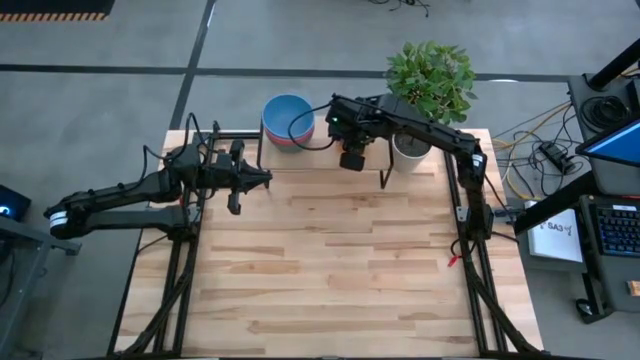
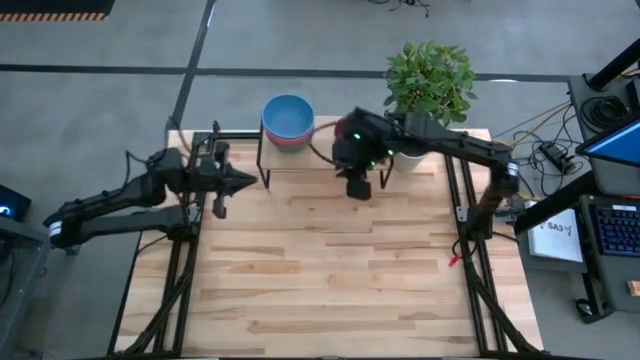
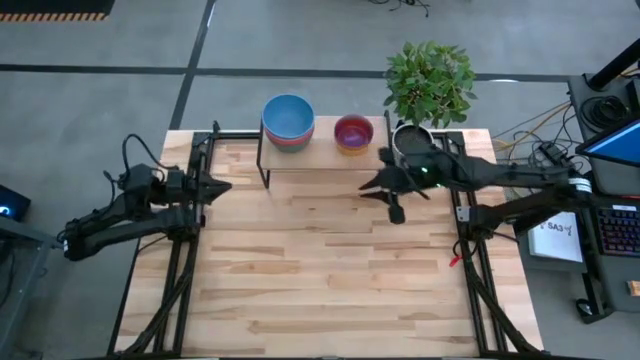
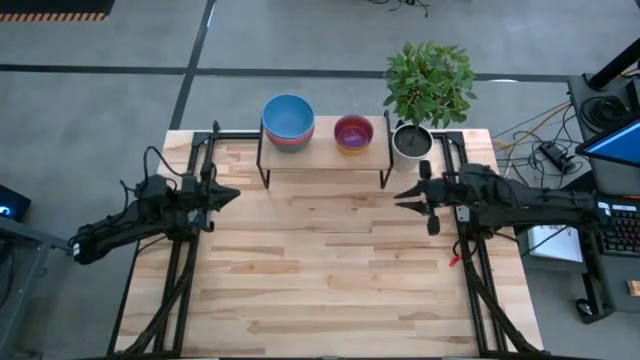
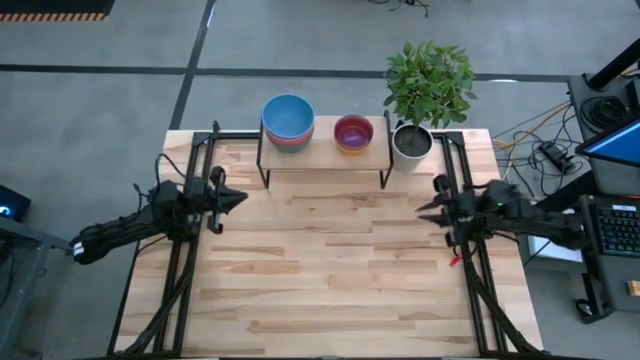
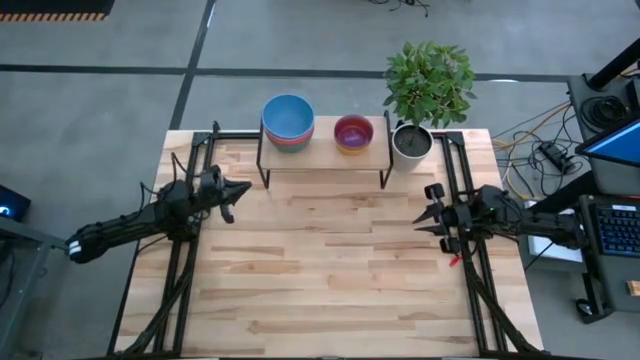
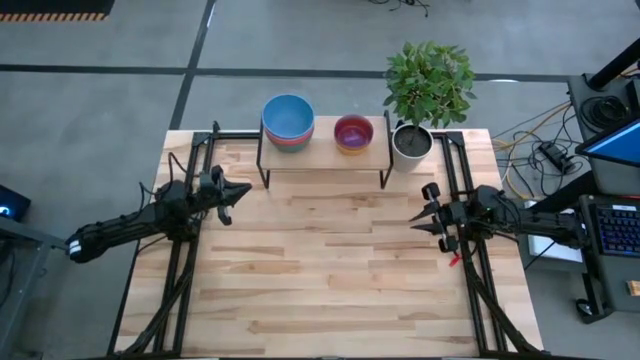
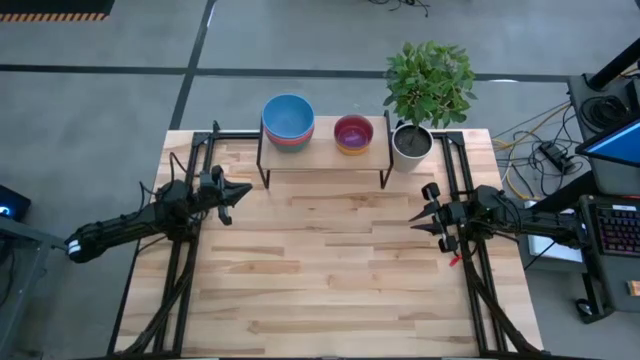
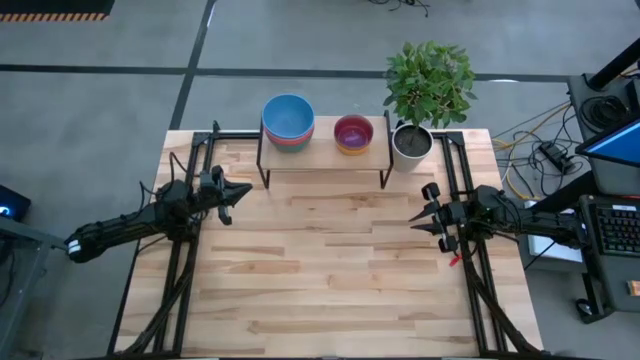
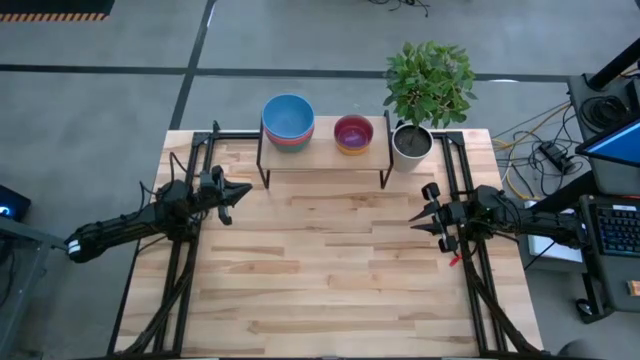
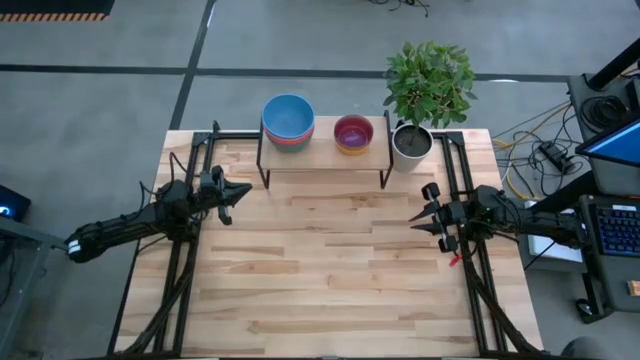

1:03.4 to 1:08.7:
Task: Place and stack bowls onto a shelf
Return to Home Position

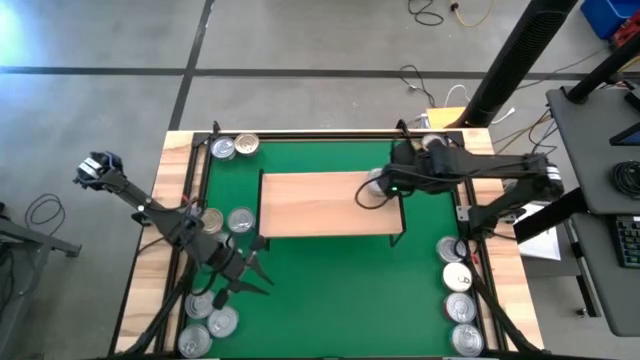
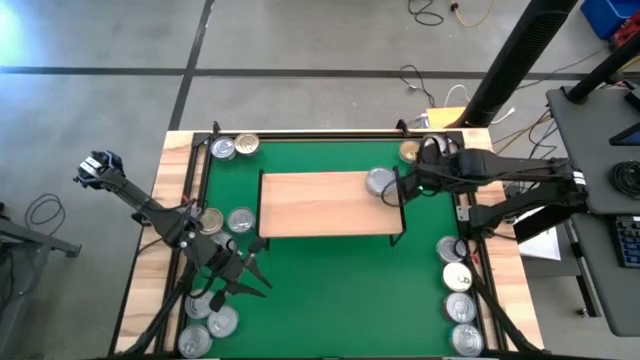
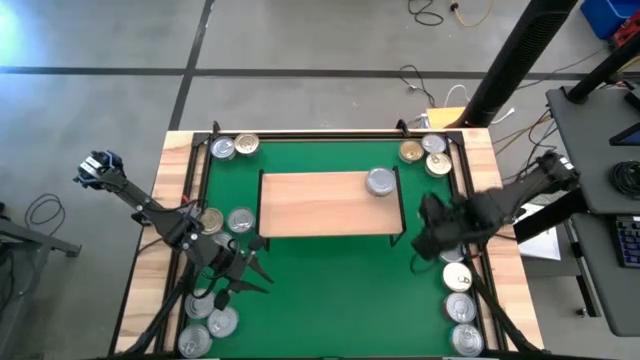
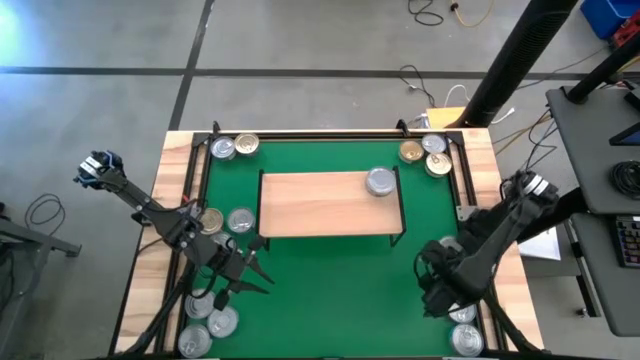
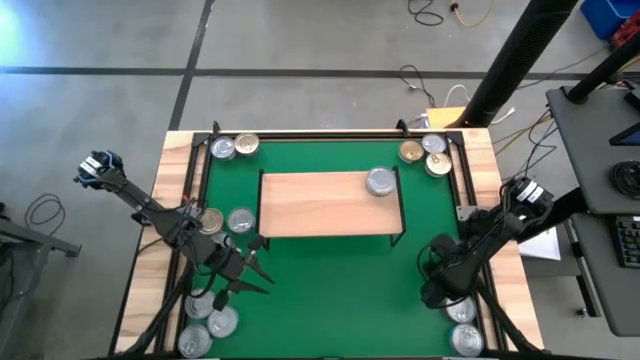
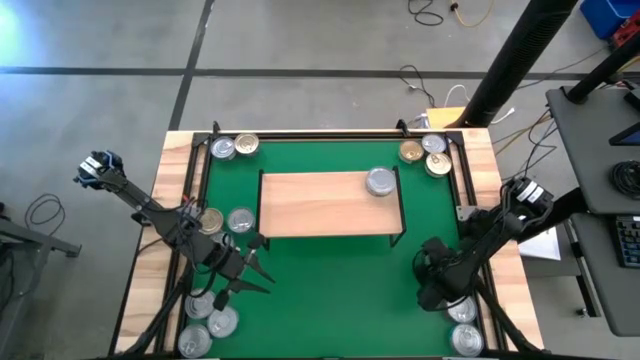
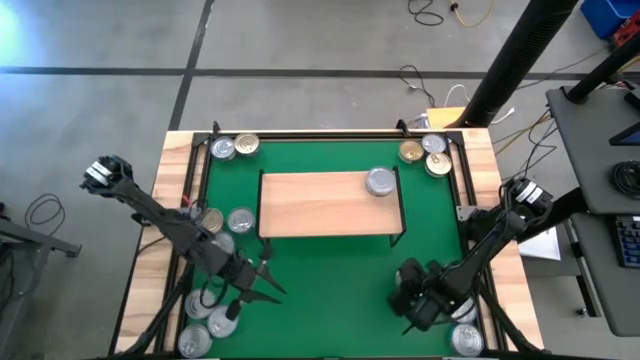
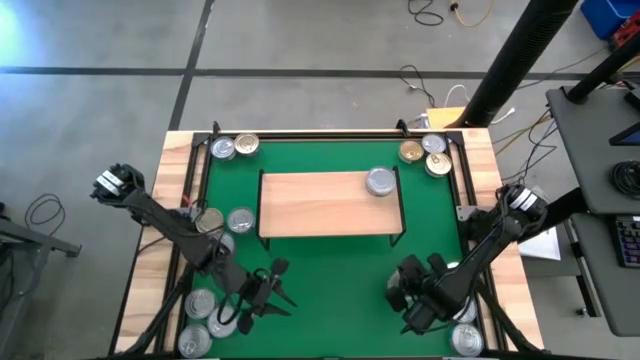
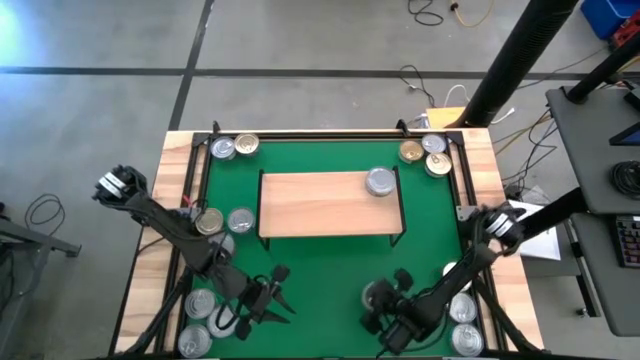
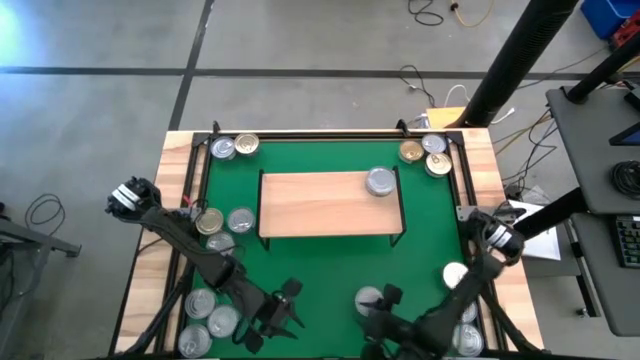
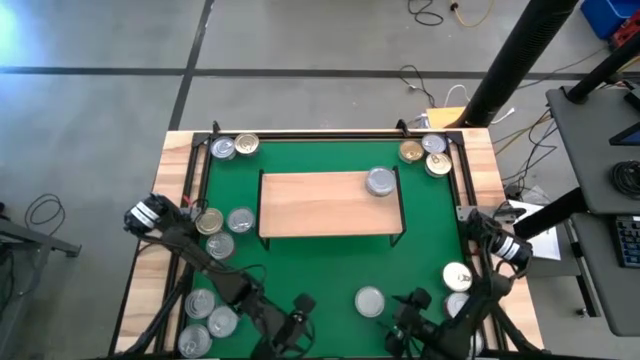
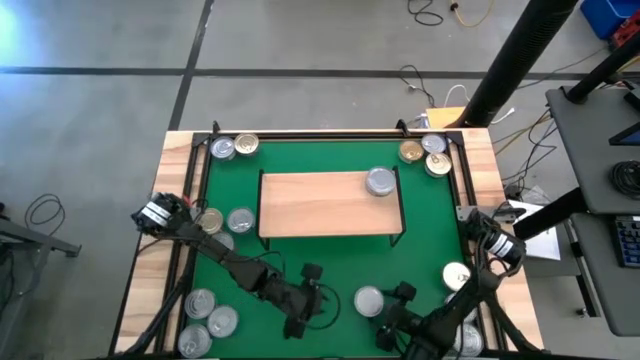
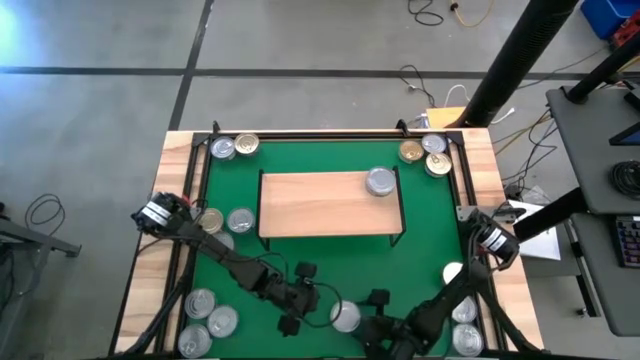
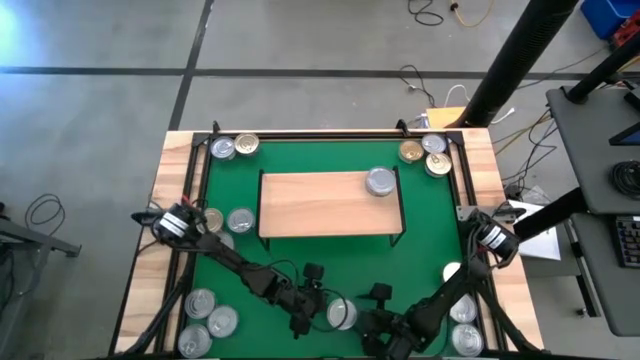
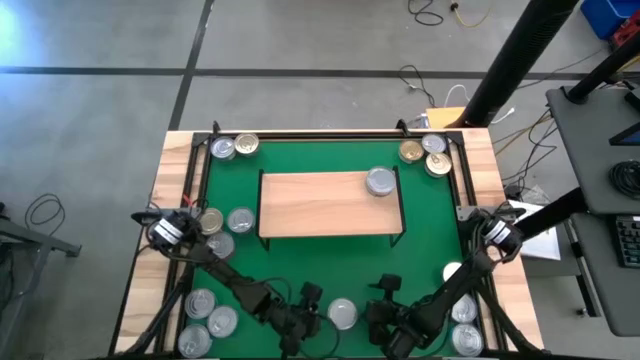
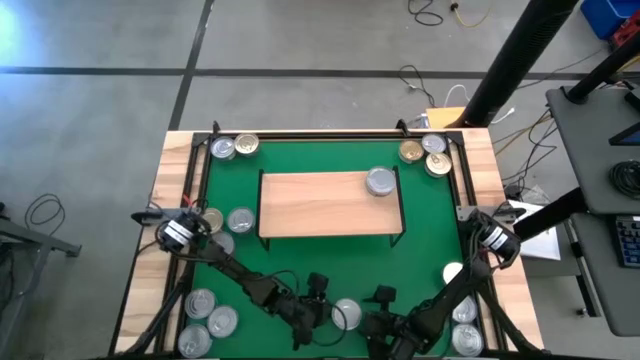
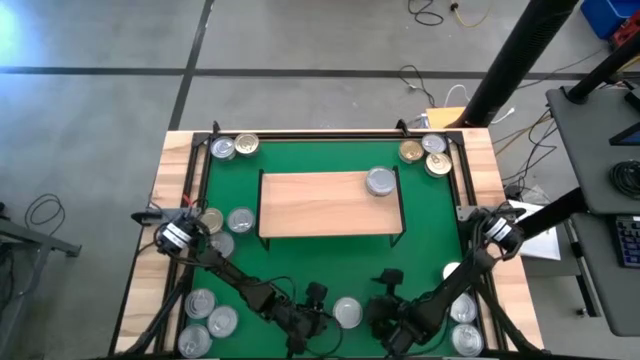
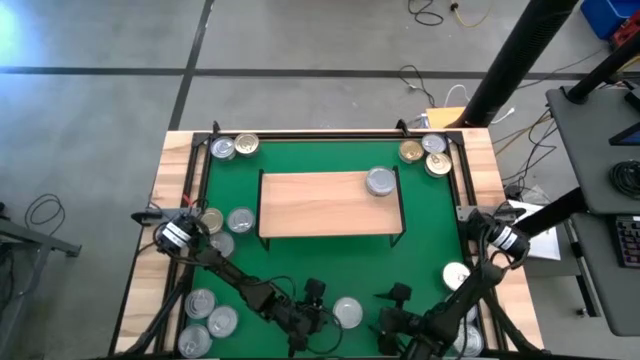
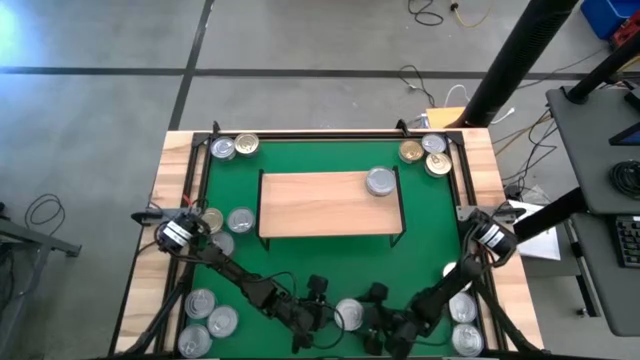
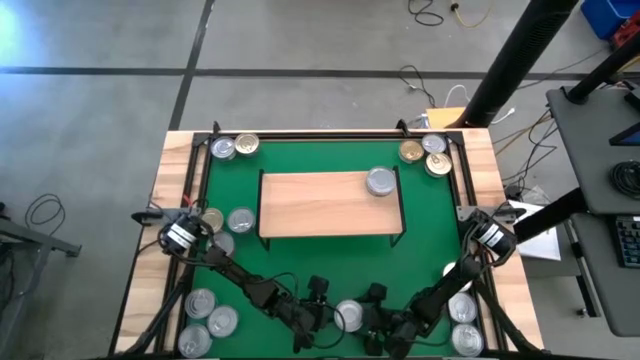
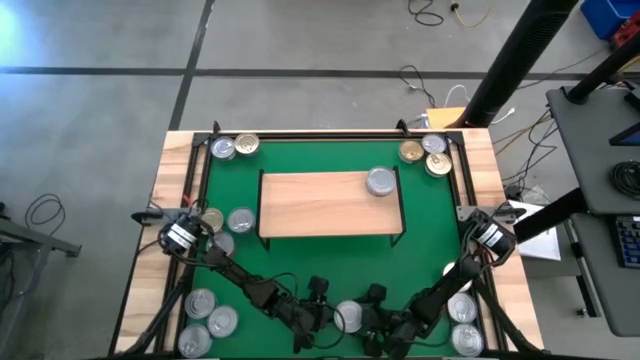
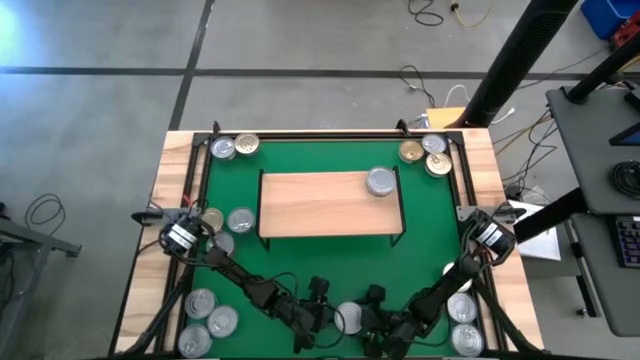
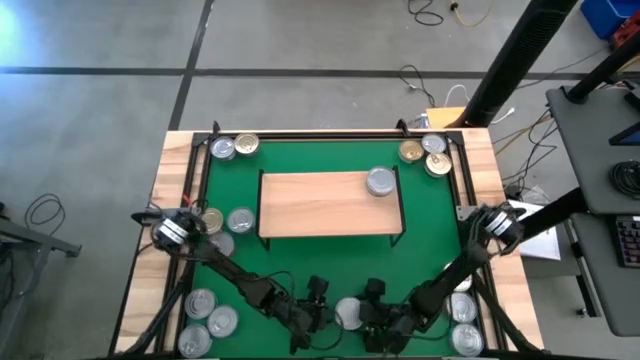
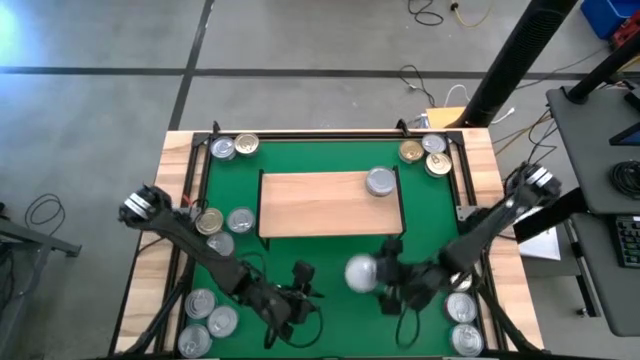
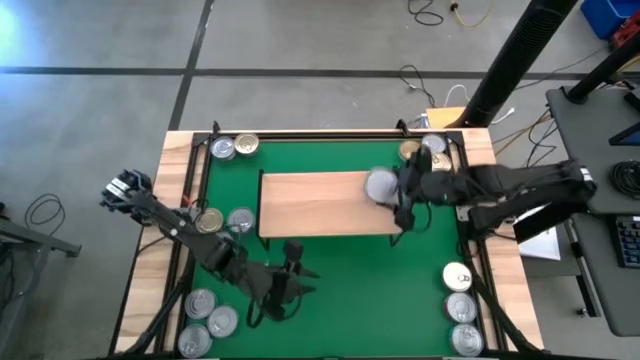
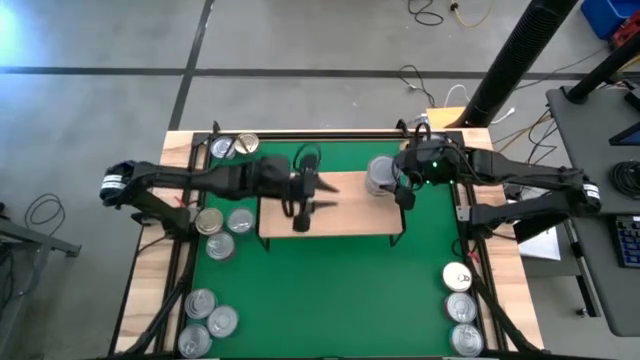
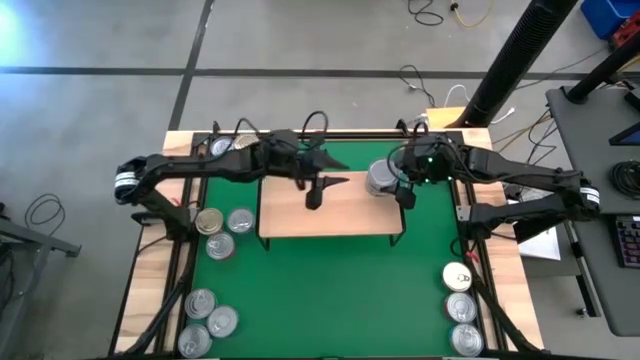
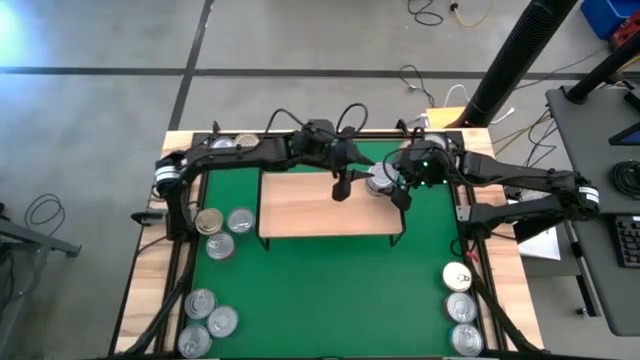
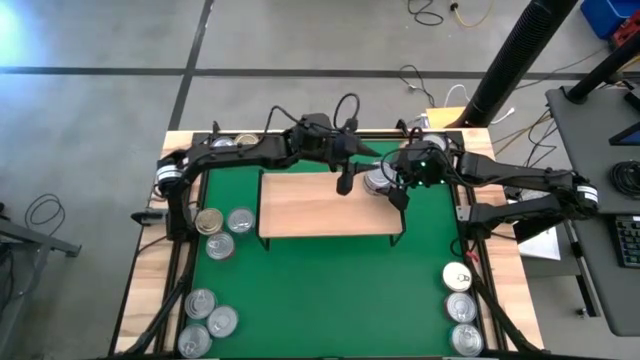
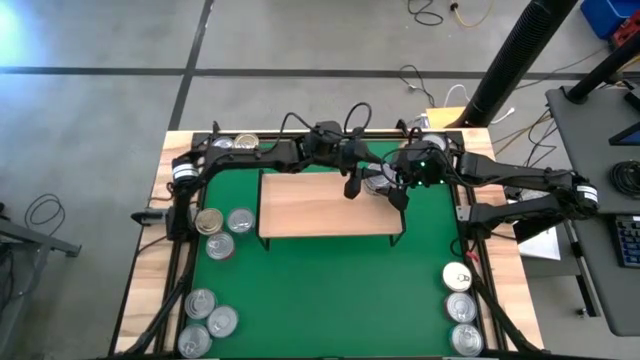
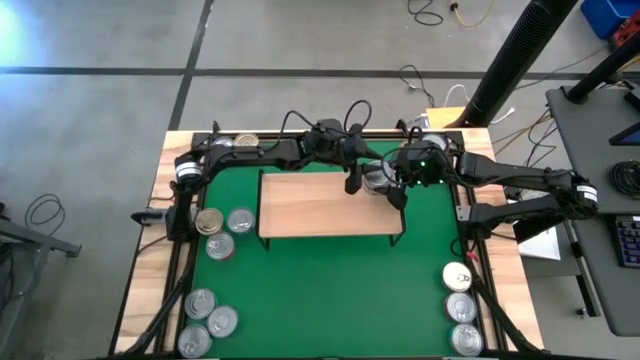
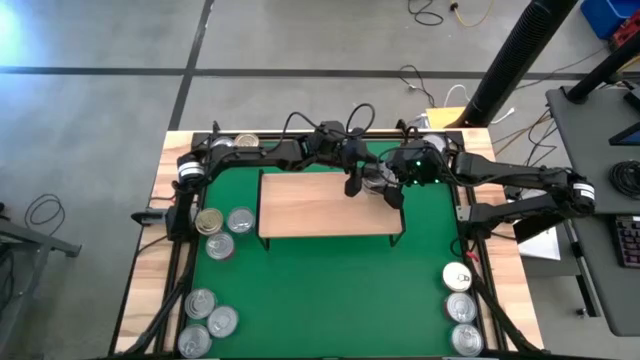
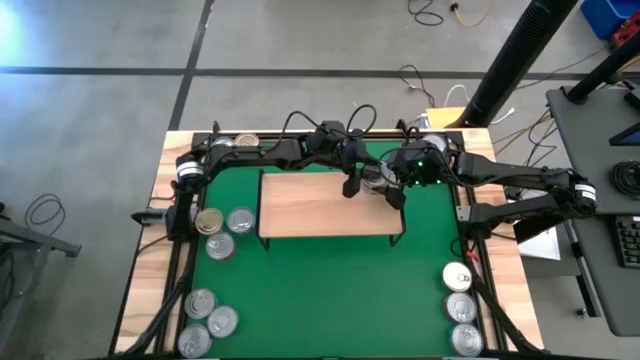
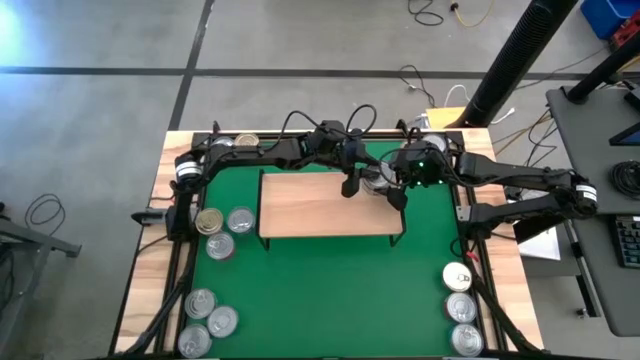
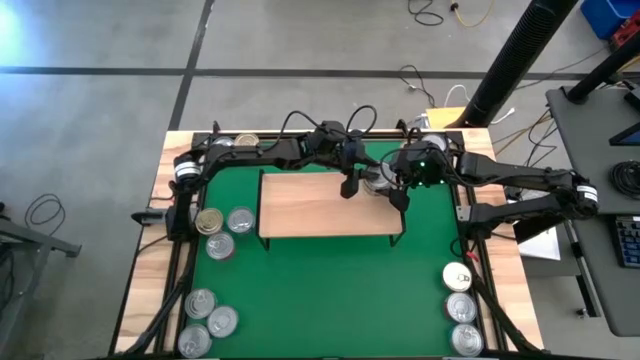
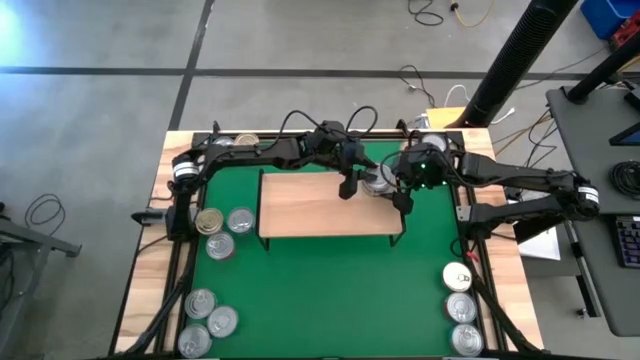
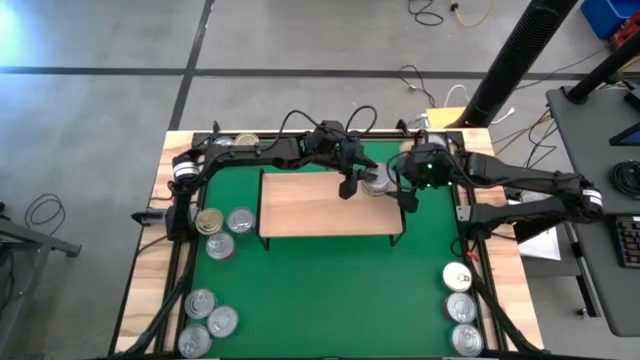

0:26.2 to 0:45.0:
Task: Stack canned seafood by type on shelf
Stack the green tuna can on top of the green tuna can on the shelf
